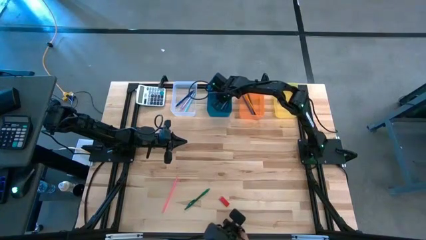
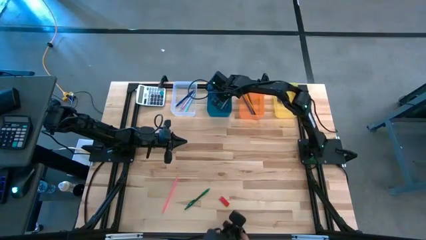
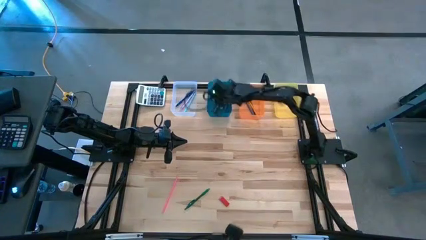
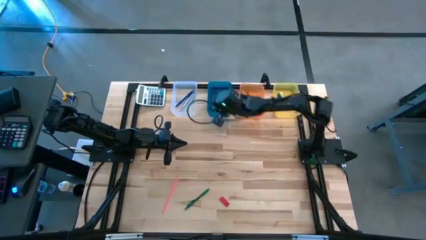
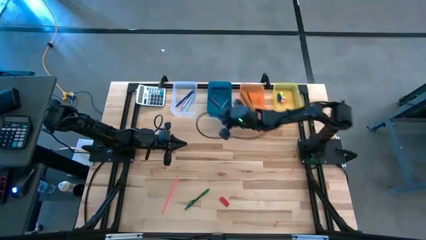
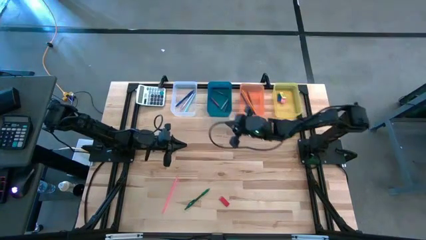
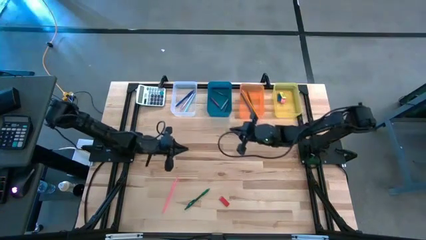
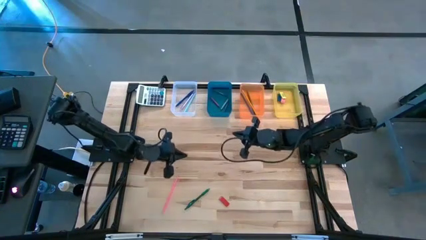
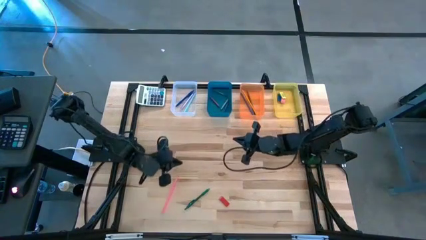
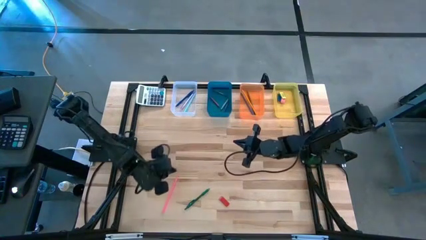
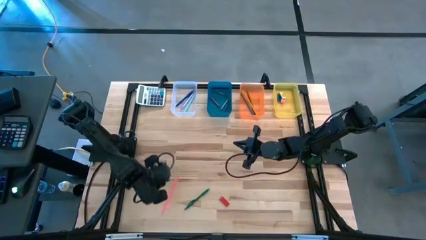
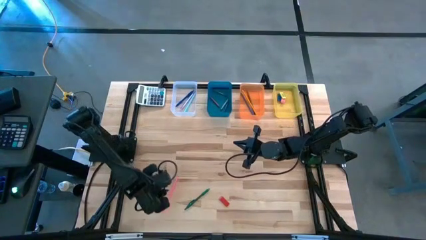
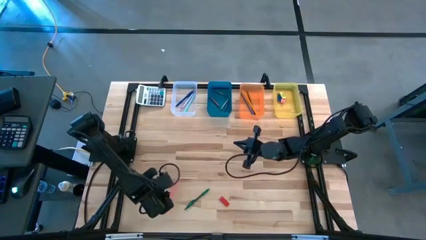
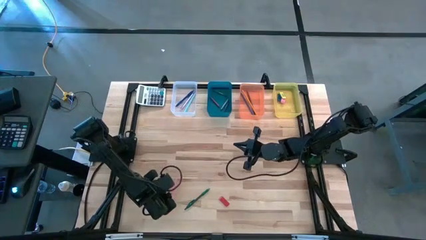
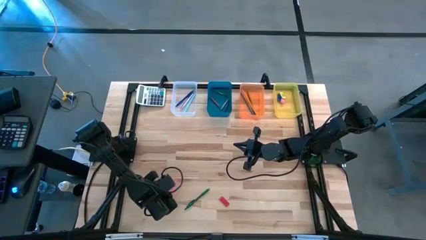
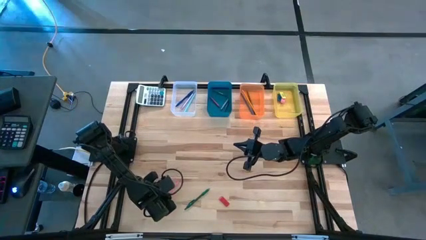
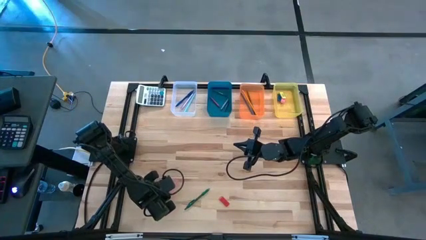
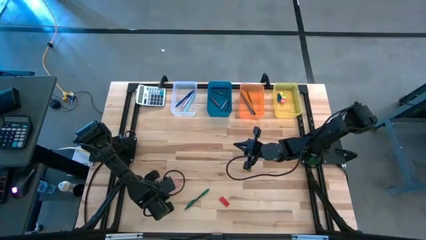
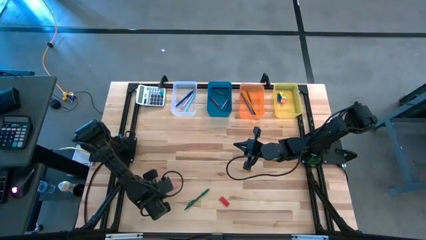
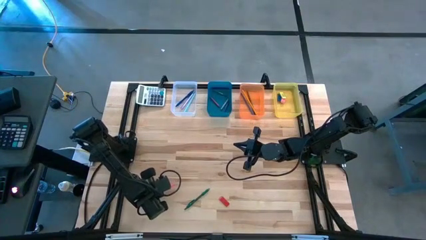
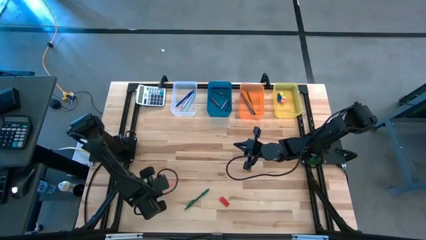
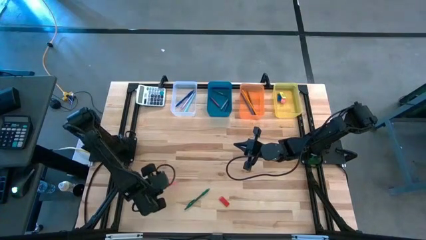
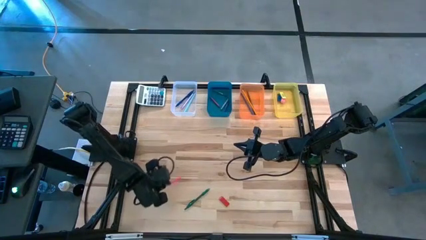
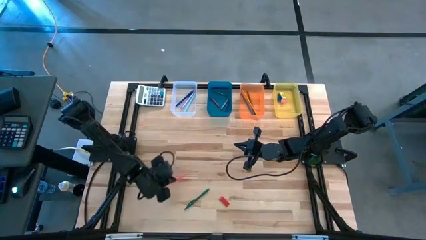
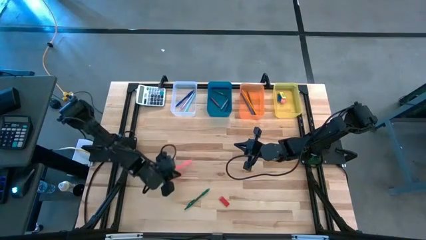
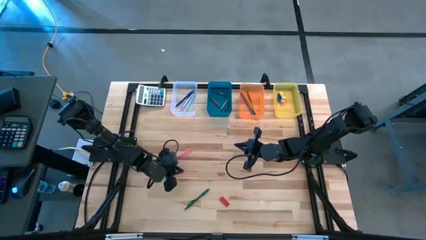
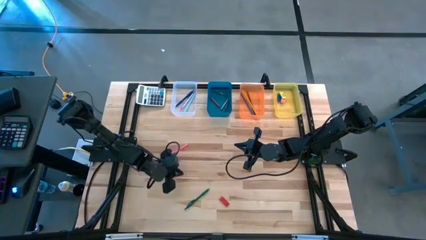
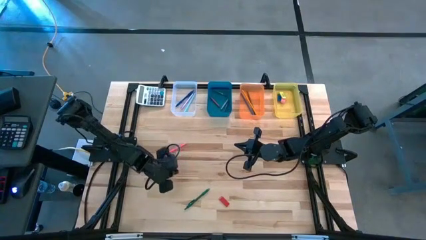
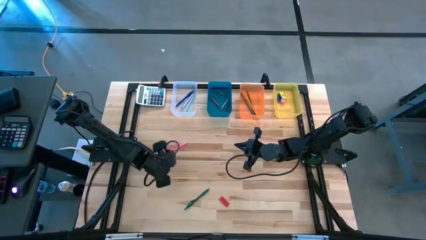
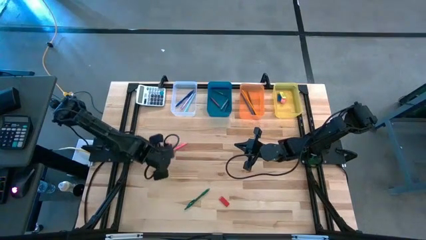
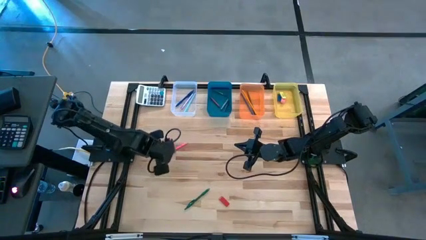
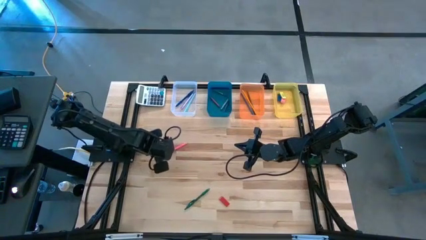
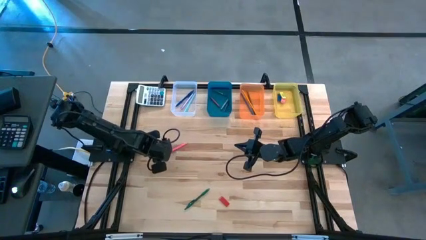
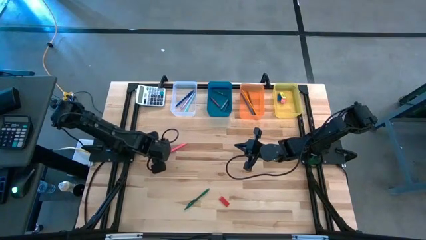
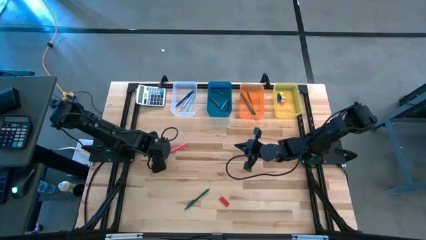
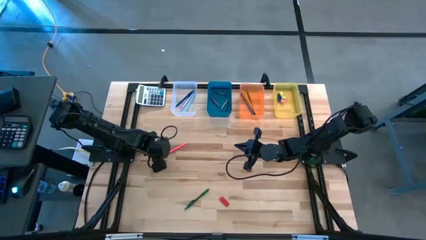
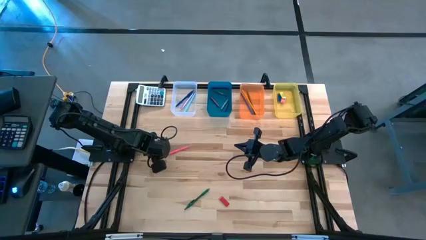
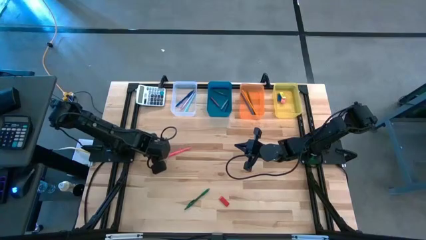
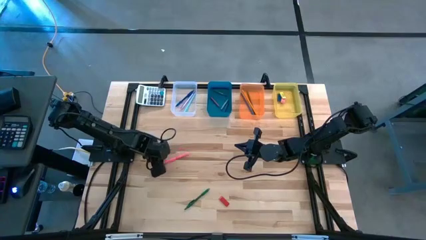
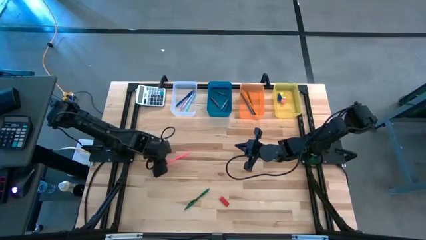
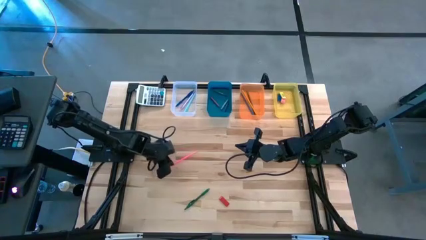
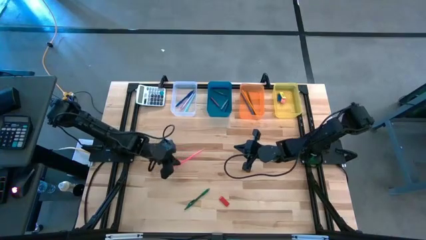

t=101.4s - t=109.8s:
Task: Sort crayons/erasers/pens/pencils in bins
Put the pink pencil into the orange bin

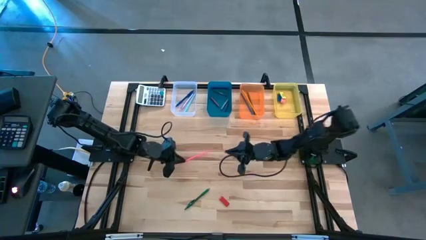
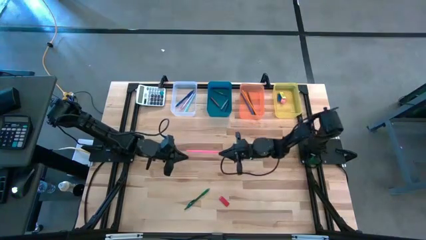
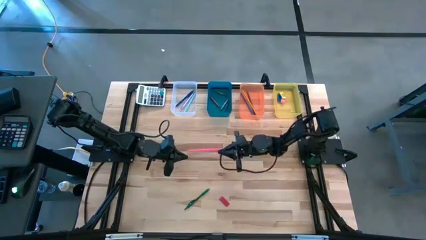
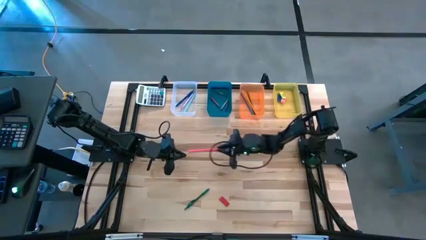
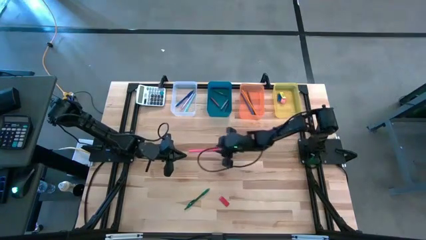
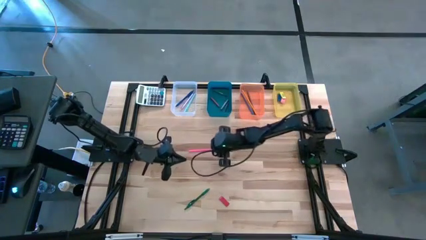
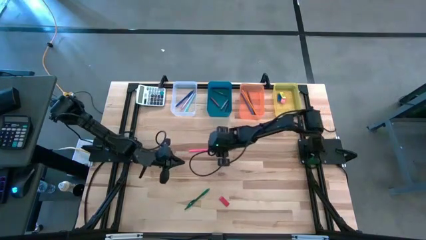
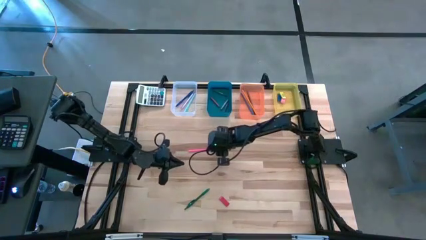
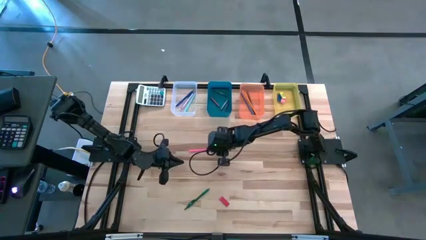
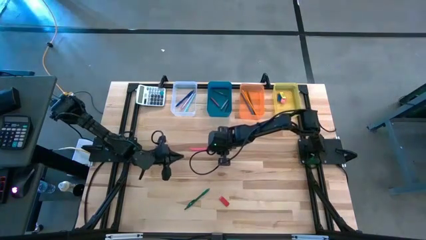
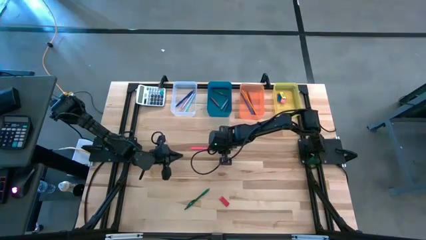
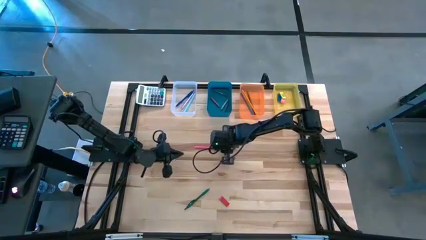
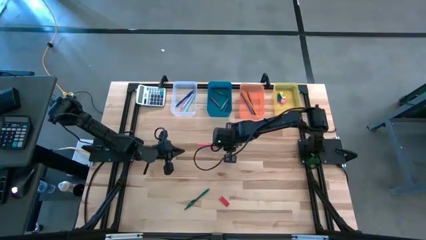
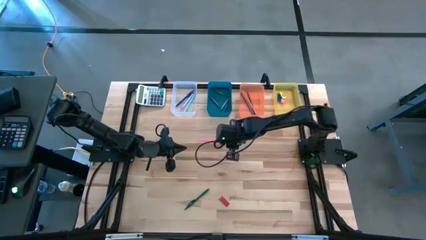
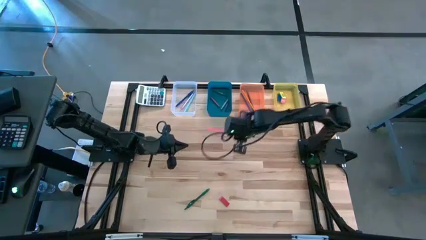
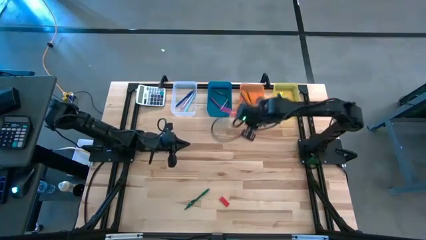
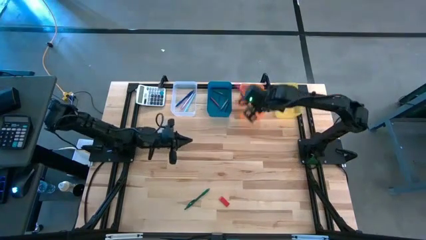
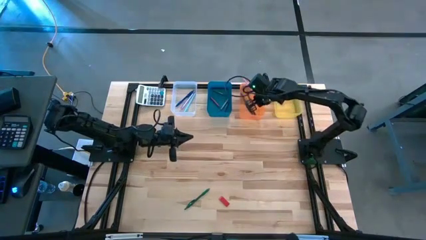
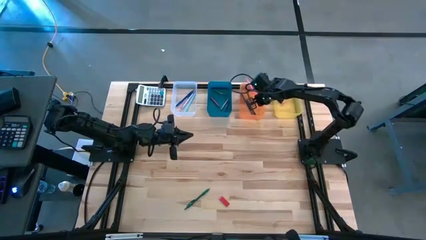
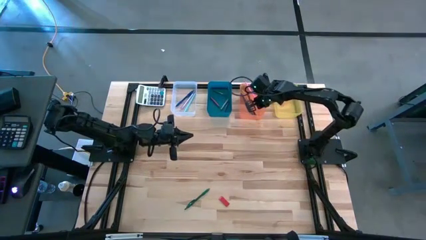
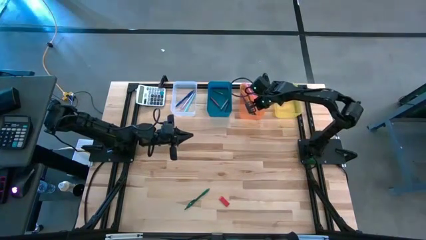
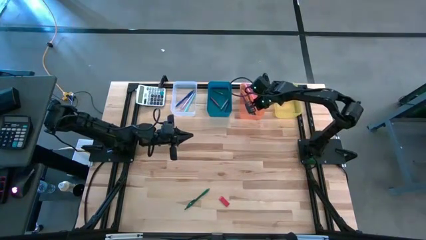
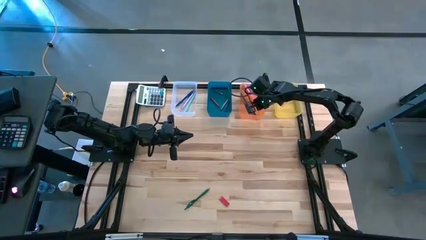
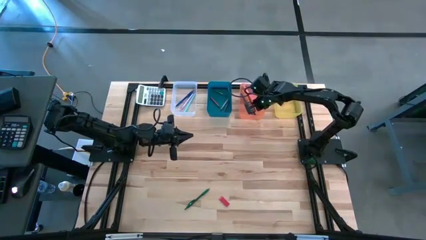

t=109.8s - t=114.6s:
Put the pink pencil into the orange bin

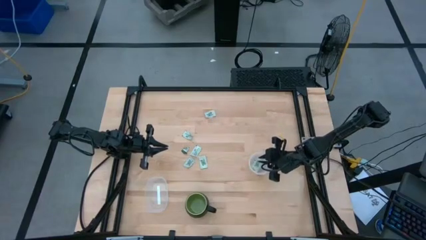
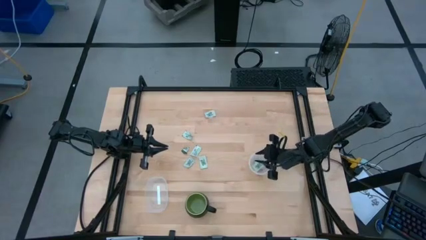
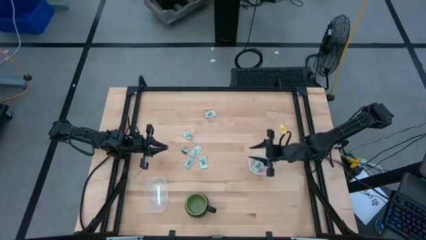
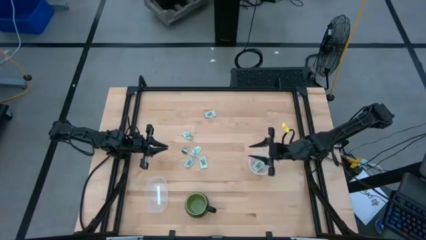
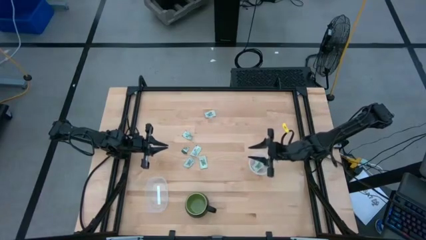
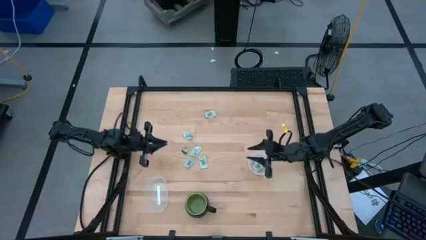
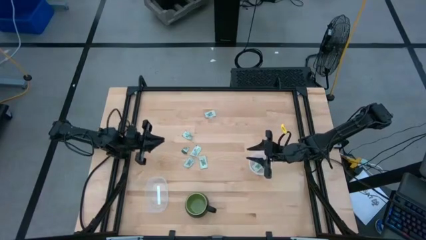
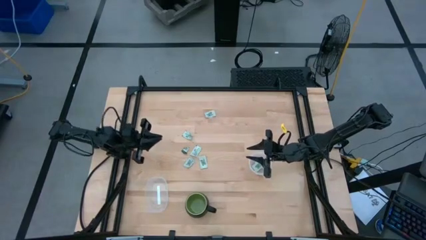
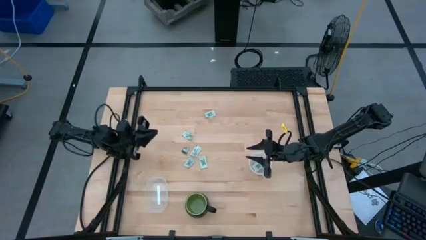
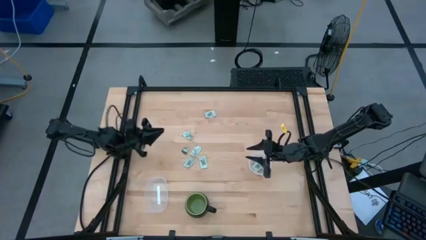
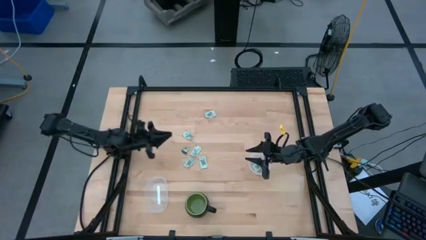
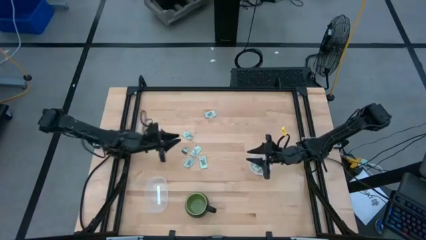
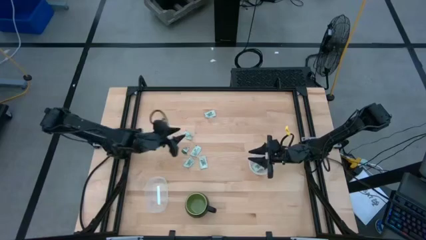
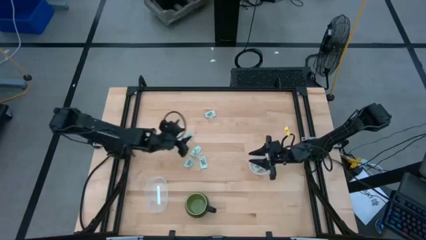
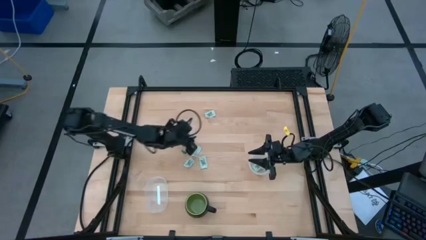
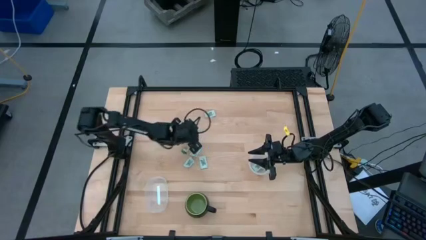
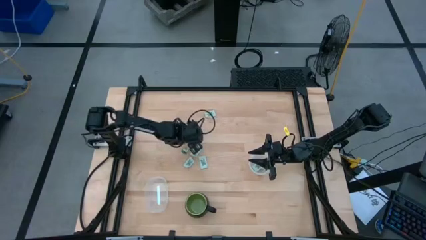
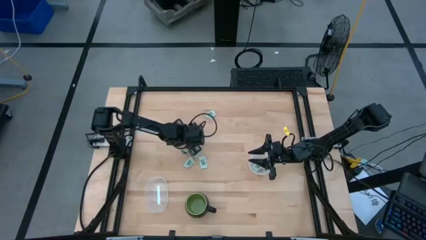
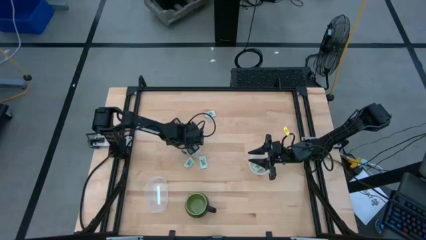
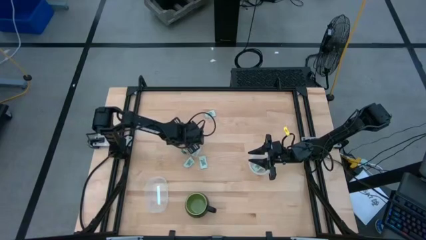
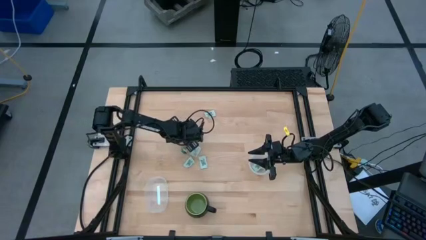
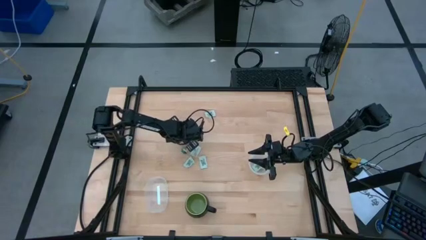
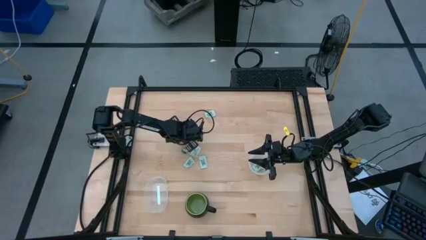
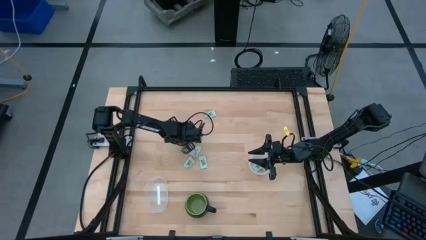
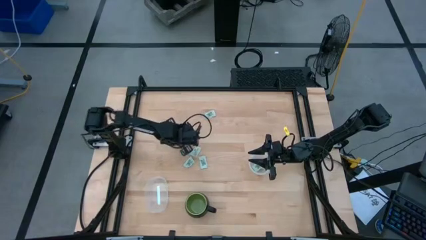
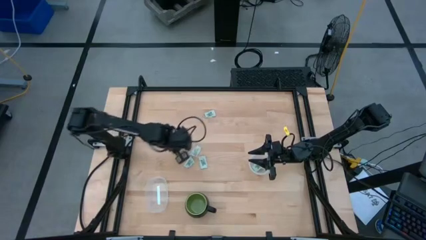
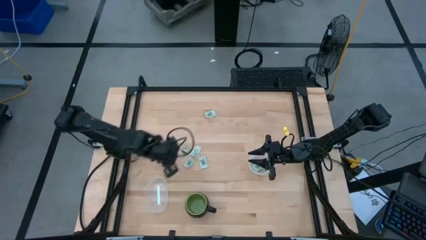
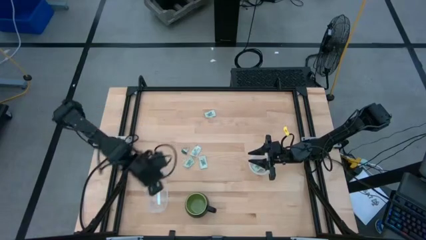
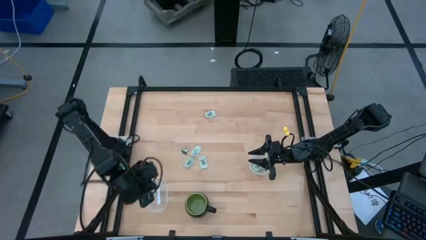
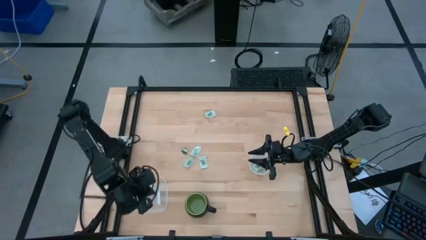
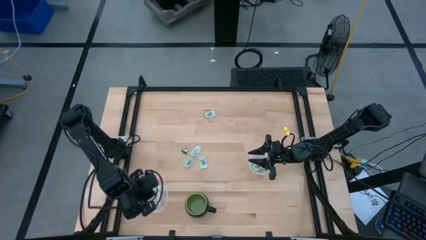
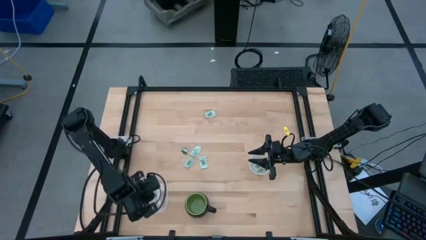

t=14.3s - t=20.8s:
Task: Pick and place Stevia / Truvia into bins
Put the white stevia packet into the rectangular transparent container
